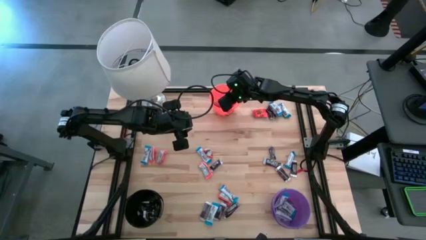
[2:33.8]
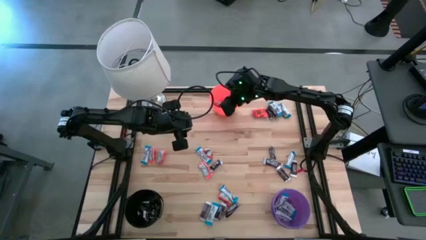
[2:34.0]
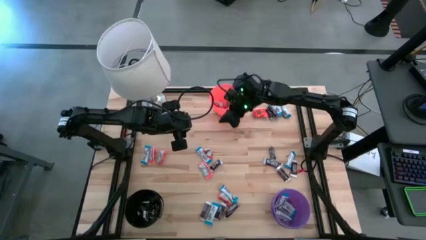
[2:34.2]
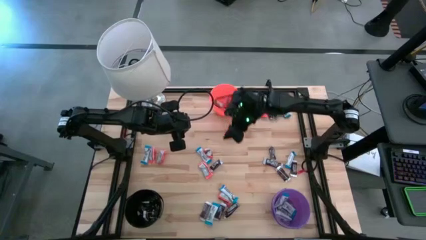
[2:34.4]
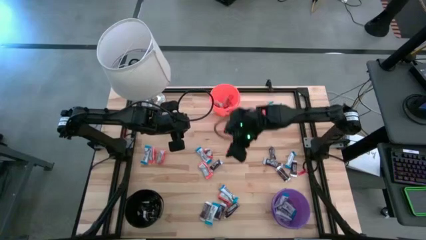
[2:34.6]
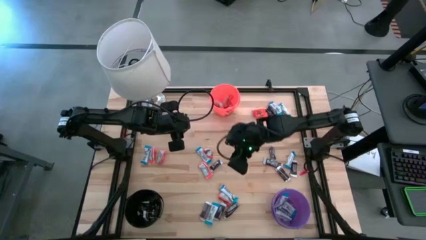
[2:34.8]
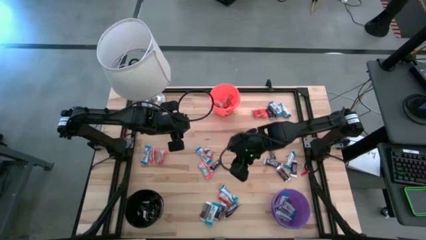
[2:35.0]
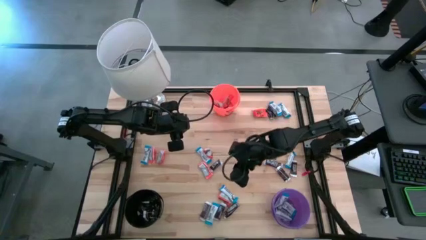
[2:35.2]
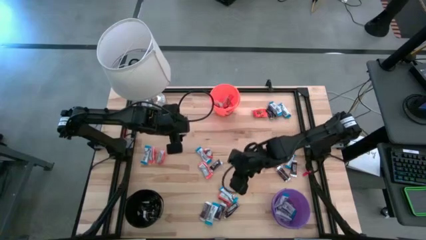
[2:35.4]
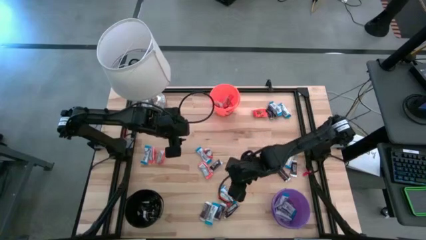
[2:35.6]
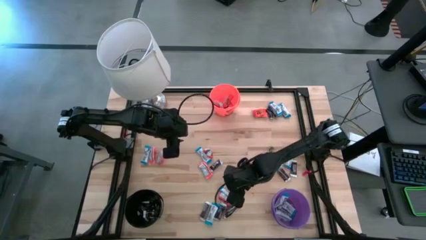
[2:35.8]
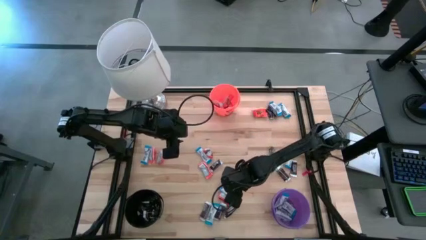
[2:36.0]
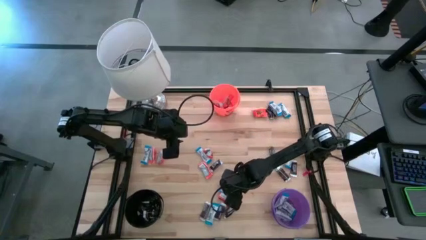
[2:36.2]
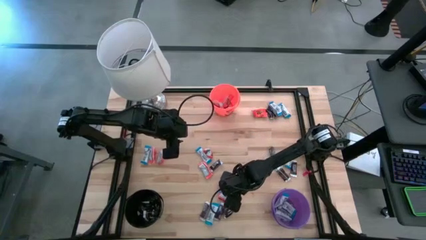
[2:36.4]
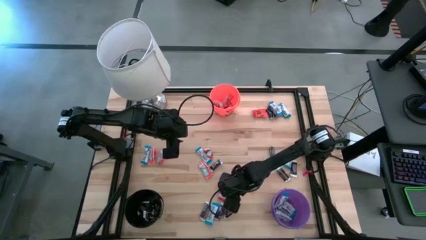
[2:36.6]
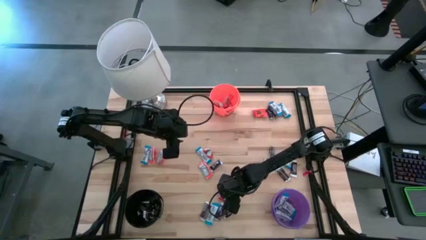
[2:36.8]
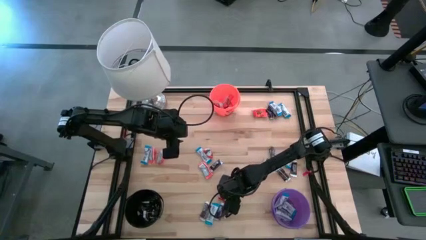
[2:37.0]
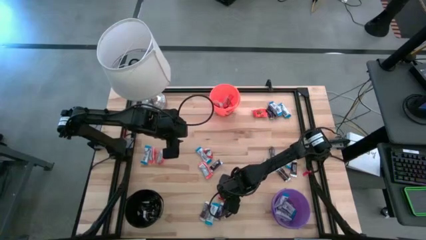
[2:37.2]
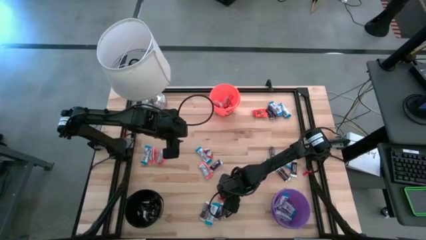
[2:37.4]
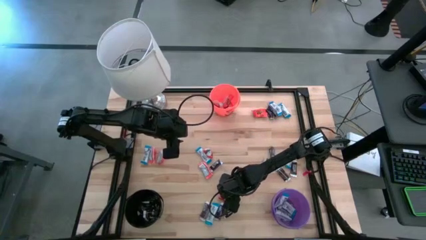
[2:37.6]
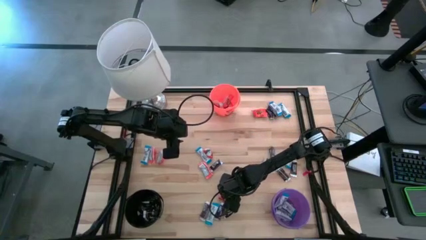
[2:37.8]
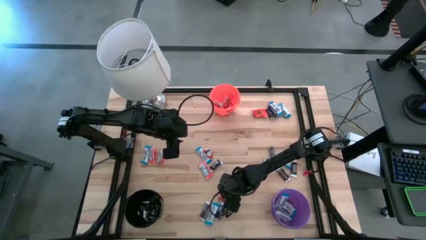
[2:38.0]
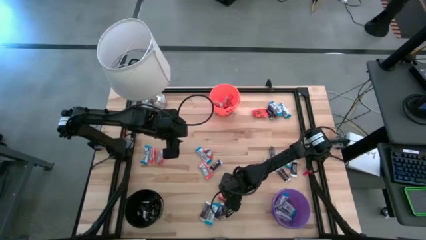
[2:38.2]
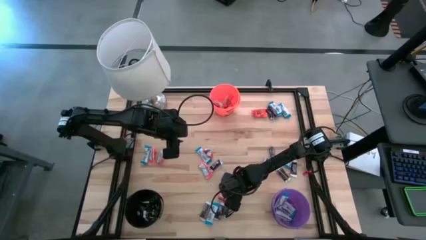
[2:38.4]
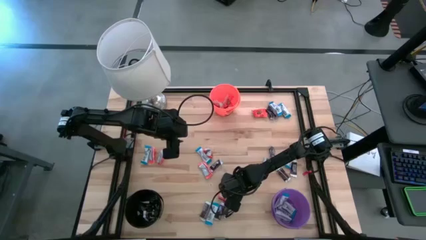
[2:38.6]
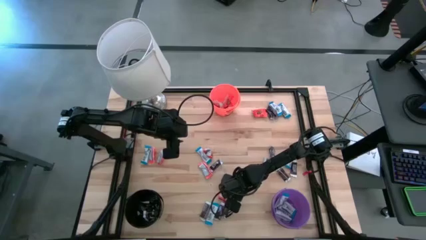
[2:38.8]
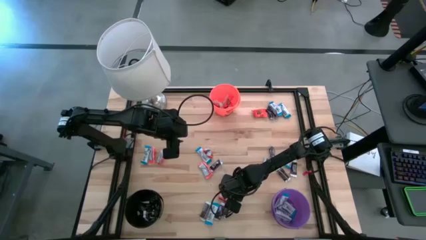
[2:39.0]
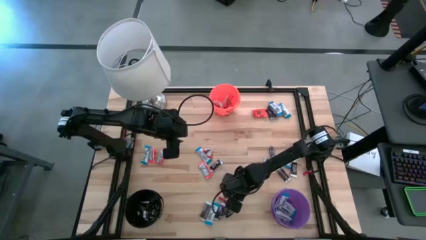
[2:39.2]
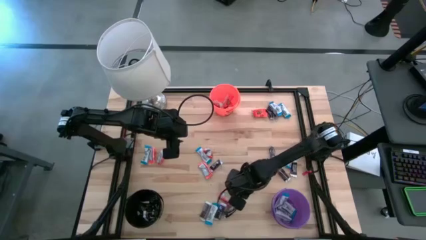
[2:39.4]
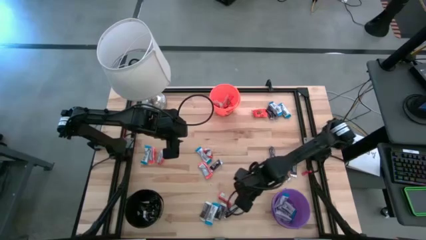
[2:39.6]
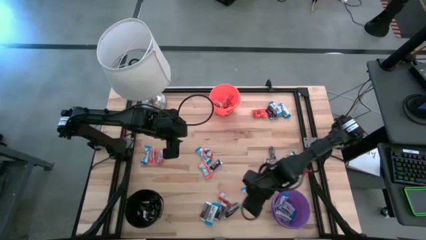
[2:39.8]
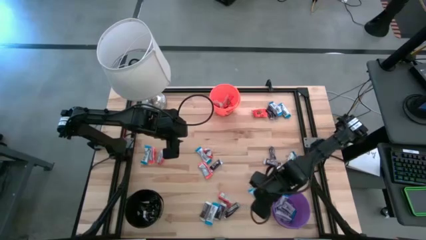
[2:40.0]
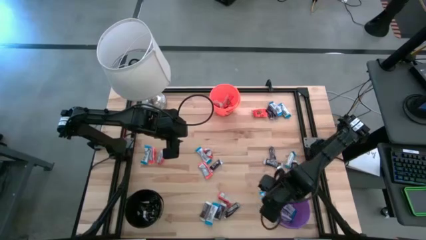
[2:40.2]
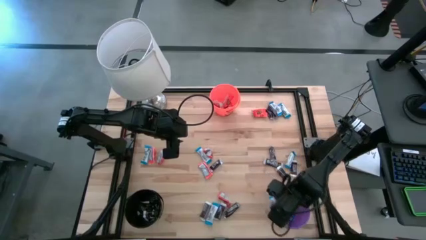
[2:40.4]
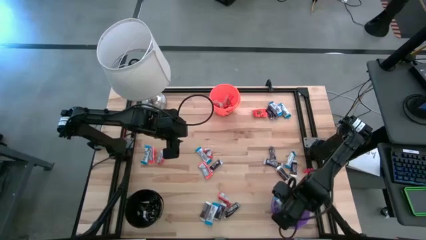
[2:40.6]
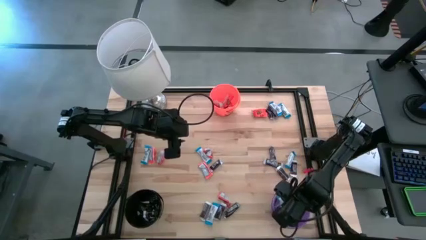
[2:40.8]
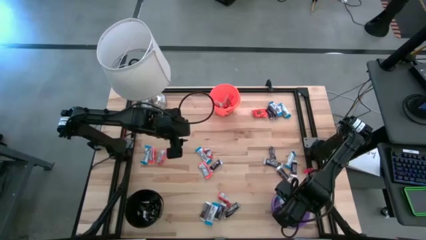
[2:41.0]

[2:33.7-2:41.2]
Task: Organize candy in baskets
Put the white chocolate into the purple bucket

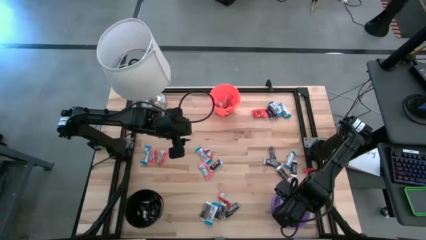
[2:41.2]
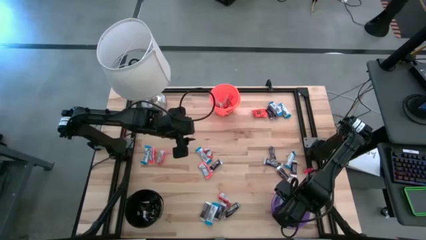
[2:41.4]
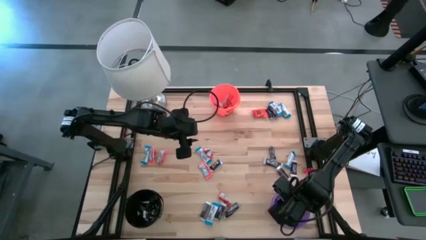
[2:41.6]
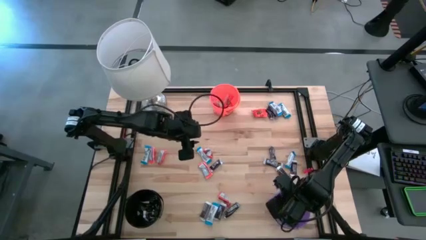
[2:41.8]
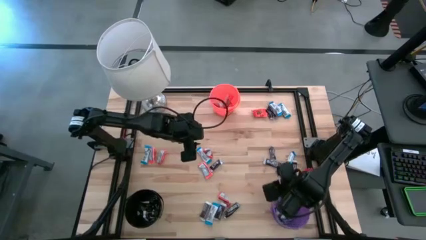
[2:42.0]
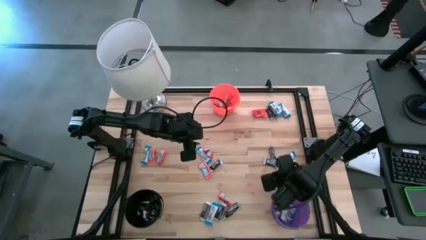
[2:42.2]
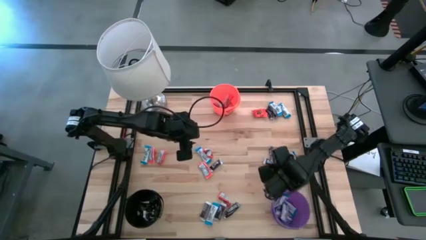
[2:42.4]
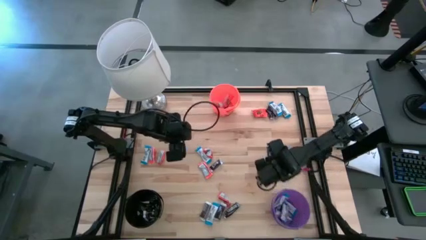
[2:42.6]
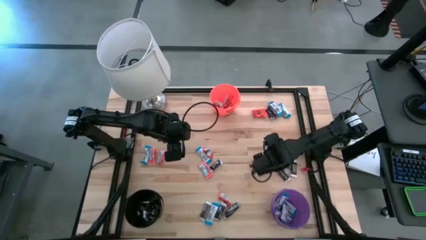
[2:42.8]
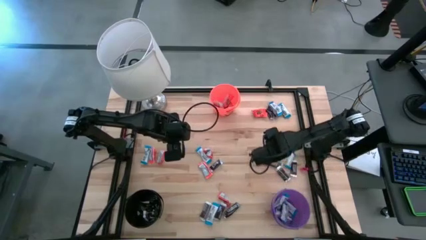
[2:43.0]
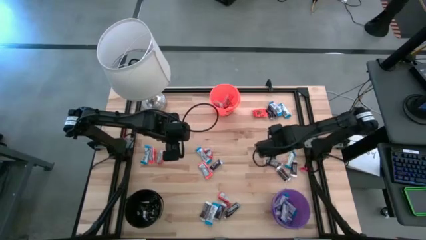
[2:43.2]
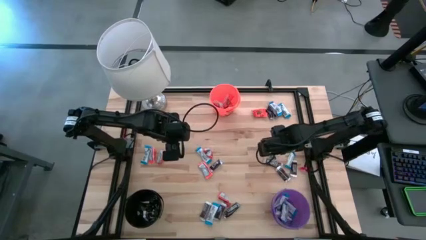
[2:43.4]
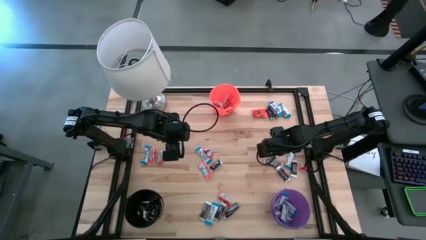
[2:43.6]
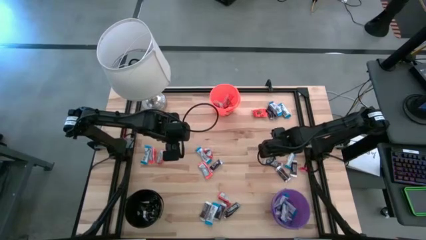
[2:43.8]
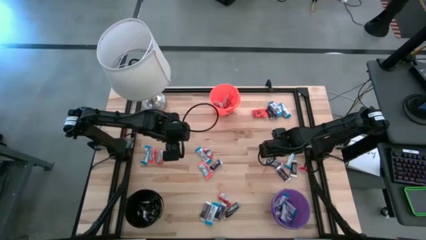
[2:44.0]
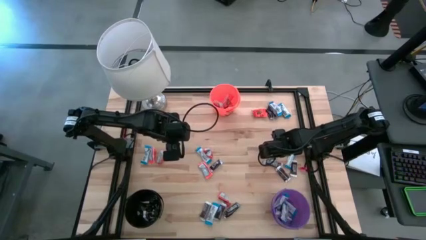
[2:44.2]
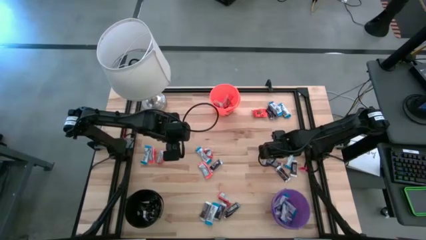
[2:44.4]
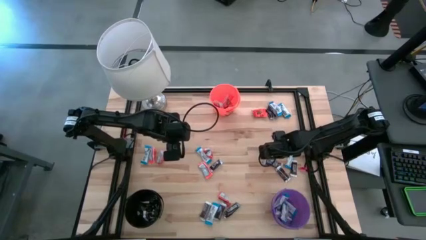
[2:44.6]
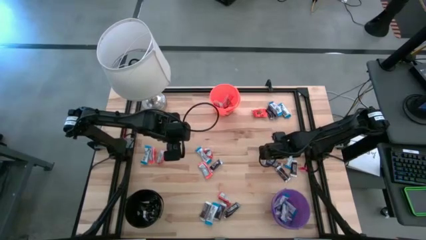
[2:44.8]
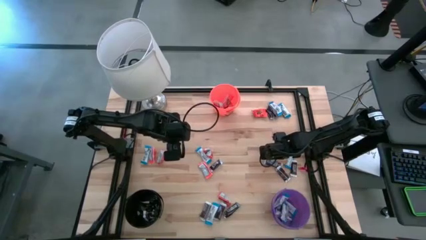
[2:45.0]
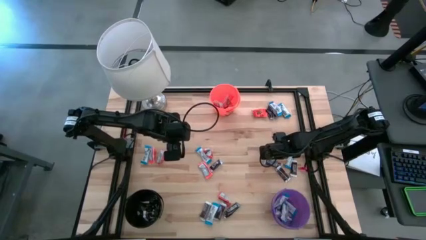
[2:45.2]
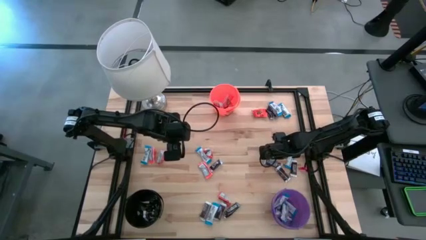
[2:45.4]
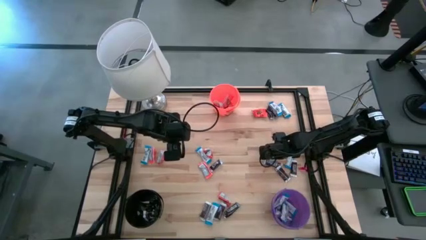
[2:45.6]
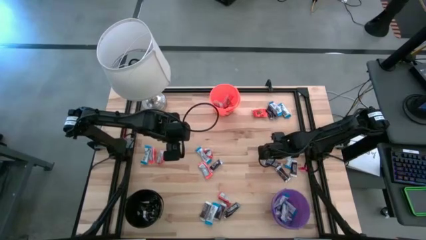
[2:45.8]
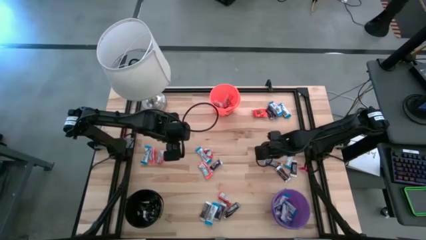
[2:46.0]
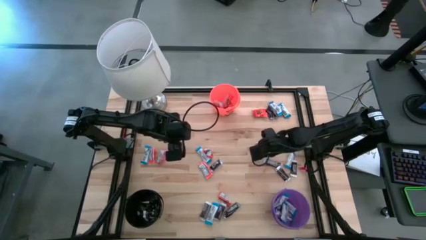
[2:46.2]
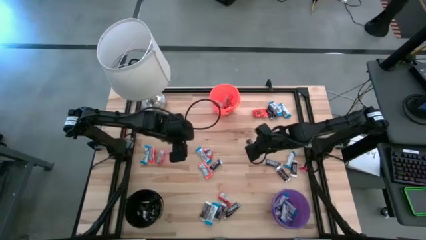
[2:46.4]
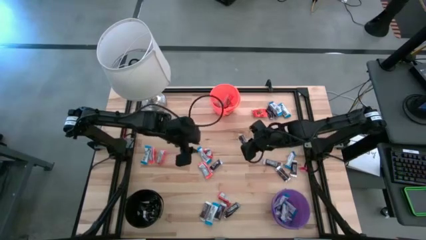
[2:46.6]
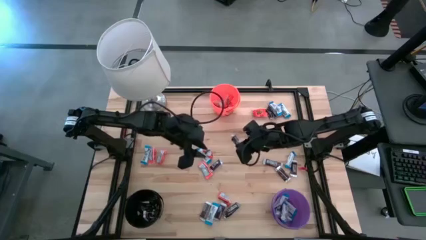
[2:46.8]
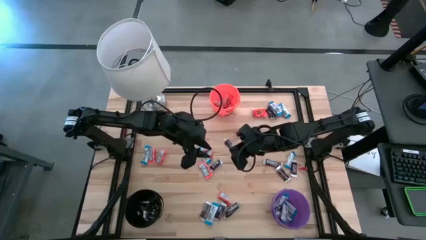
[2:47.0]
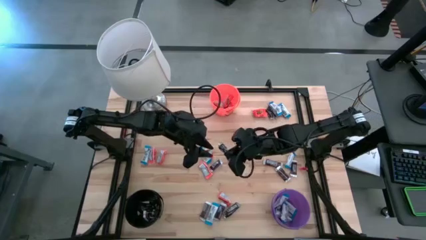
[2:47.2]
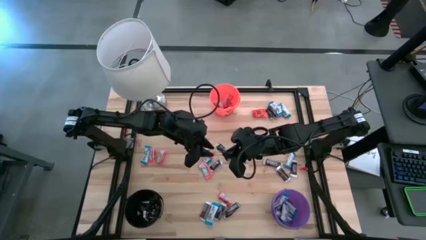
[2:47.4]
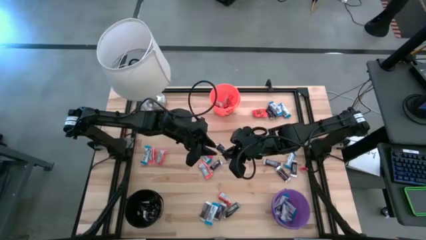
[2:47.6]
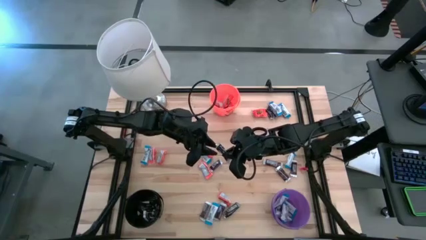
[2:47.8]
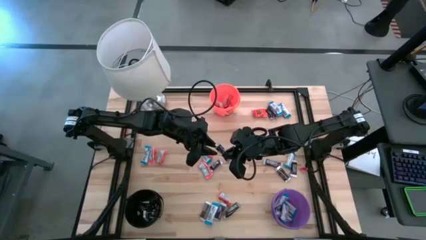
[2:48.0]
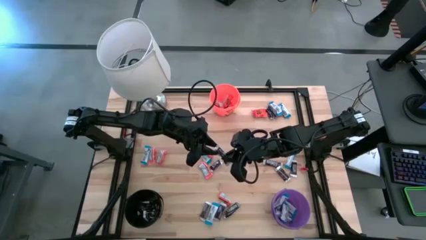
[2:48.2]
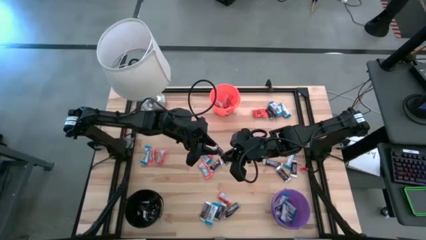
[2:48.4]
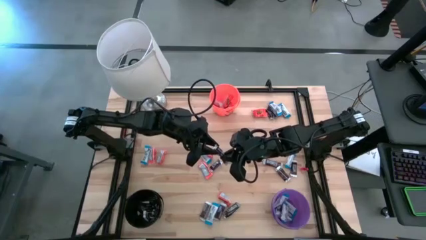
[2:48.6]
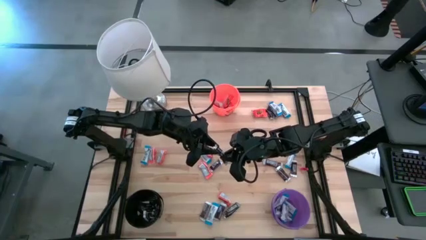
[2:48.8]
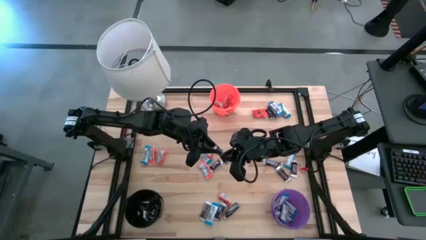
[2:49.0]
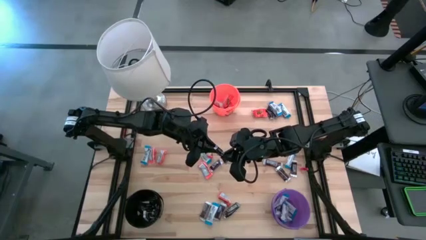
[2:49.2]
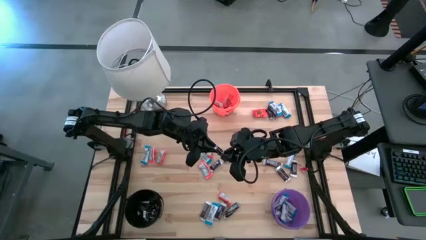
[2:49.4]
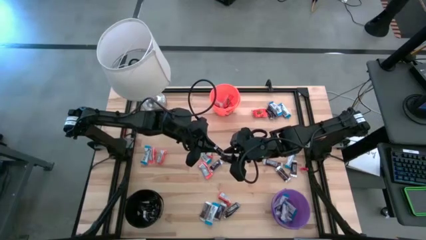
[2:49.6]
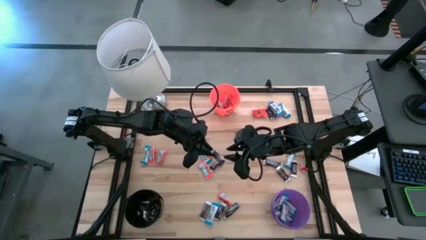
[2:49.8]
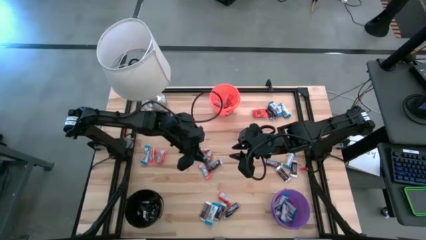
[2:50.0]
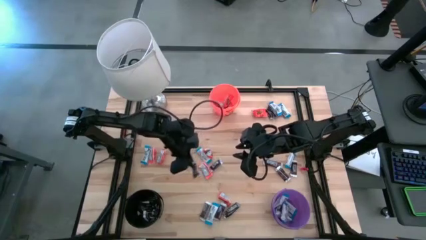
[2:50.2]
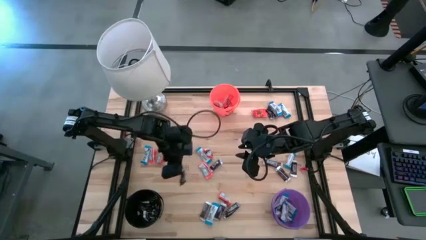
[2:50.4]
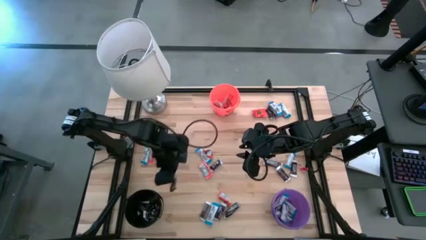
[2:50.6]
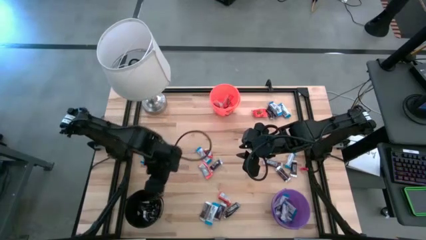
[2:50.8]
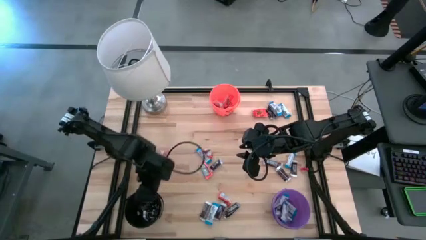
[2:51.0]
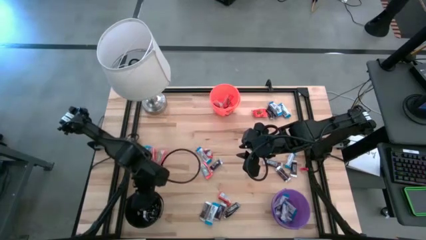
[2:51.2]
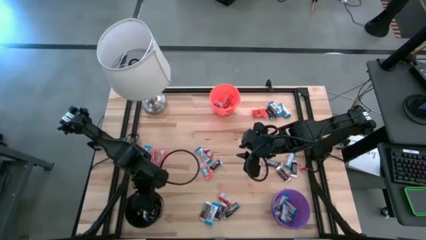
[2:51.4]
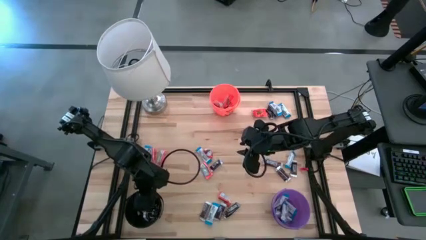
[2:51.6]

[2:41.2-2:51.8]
Put the brown chocolate into the black bucket
